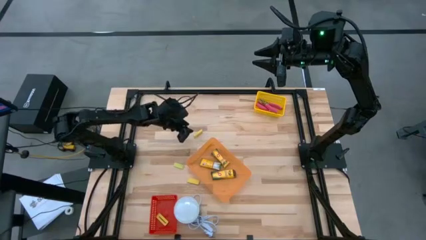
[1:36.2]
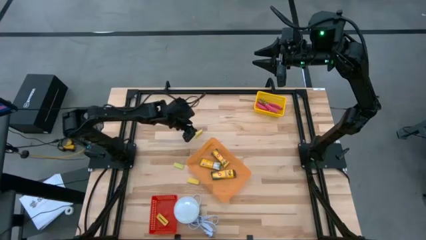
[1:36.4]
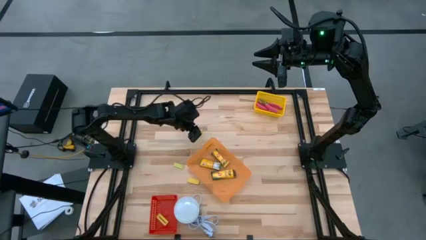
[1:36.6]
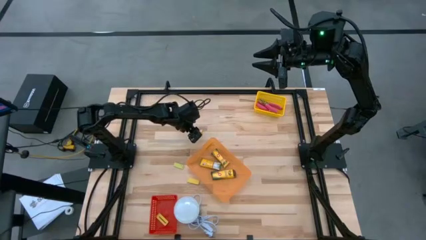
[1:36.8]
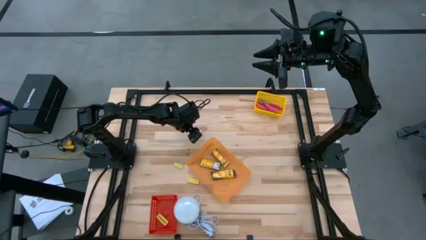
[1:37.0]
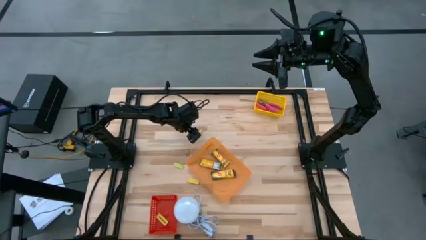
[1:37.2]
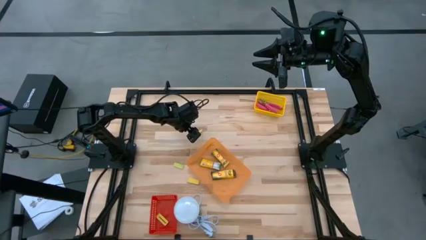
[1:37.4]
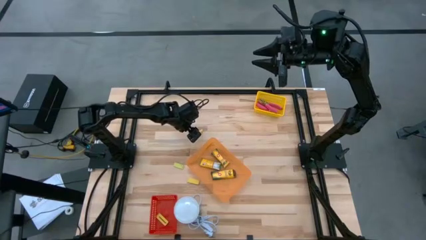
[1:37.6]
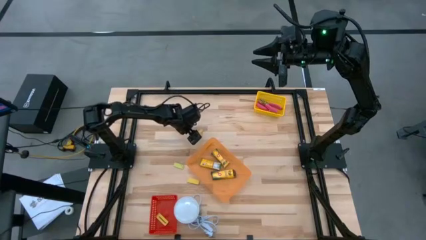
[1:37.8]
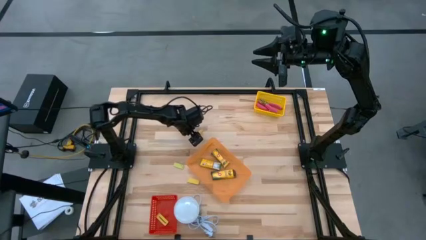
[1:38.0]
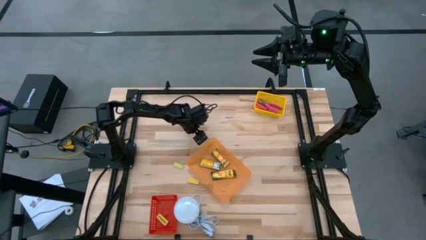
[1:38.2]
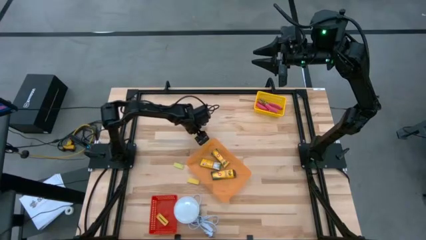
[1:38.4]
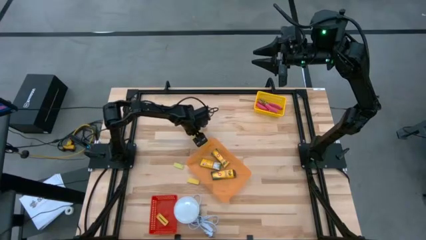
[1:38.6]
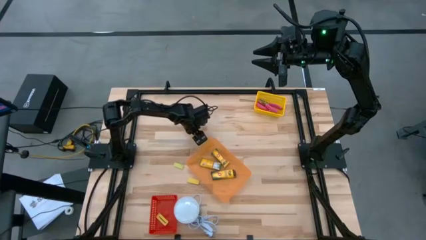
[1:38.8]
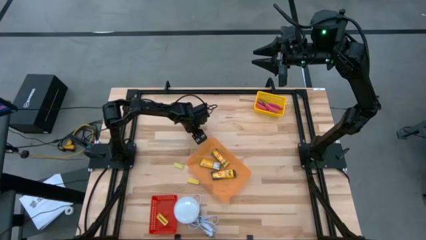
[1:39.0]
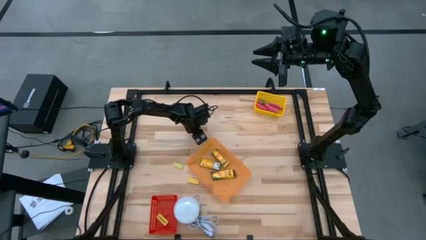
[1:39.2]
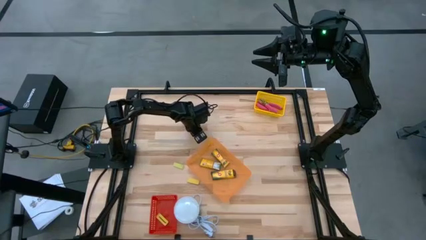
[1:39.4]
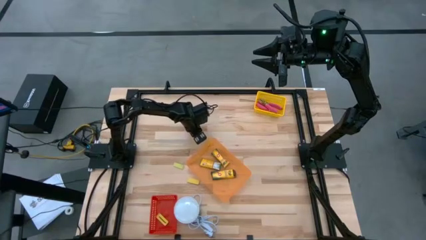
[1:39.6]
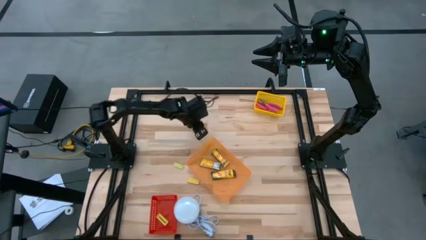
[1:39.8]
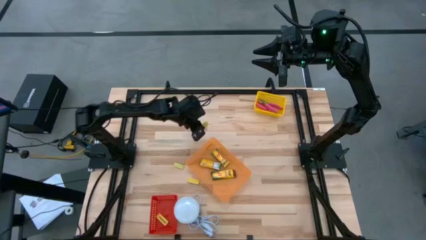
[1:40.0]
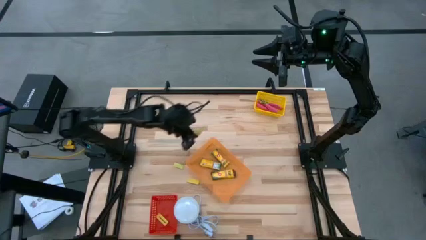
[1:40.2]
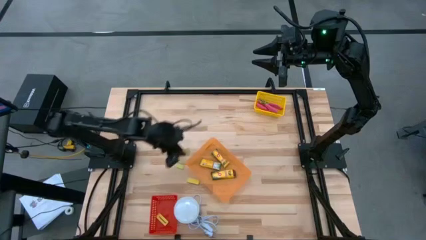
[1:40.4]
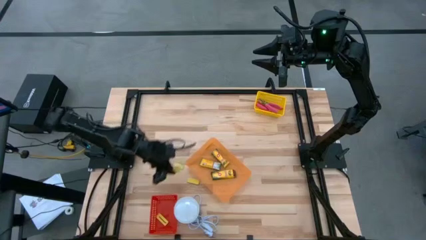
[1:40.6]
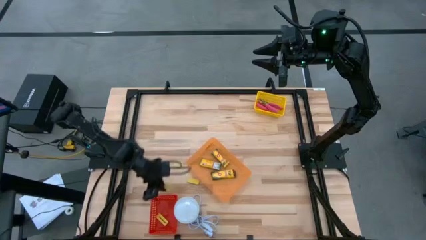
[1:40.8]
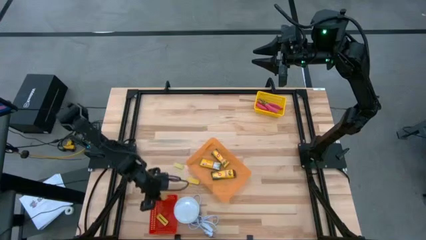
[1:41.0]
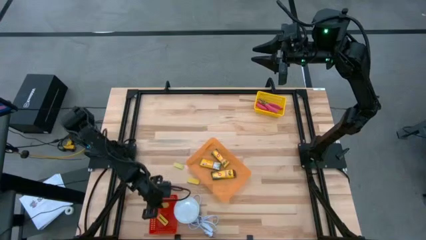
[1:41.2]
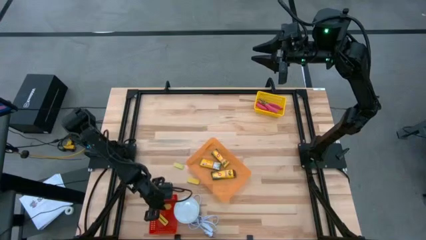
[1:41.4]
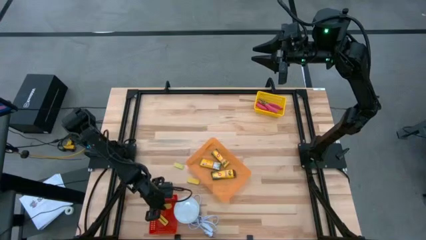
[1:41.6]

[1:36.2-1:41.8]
Task: Pick & Place School Supplies
Put the yellow eraser into the red bin

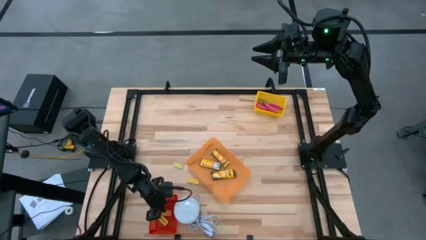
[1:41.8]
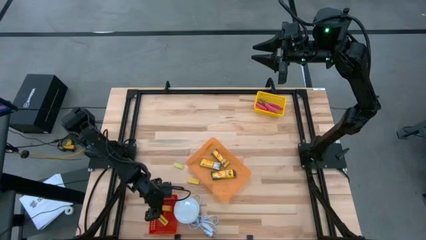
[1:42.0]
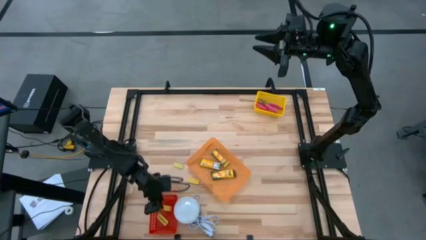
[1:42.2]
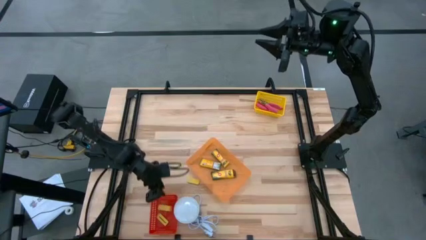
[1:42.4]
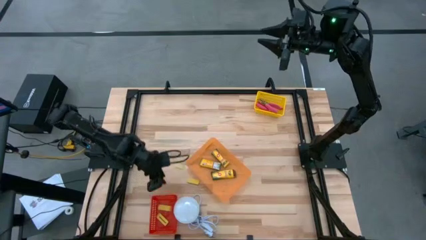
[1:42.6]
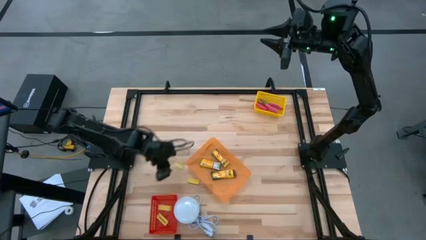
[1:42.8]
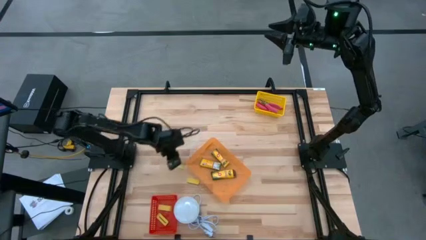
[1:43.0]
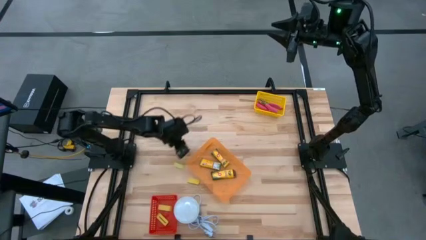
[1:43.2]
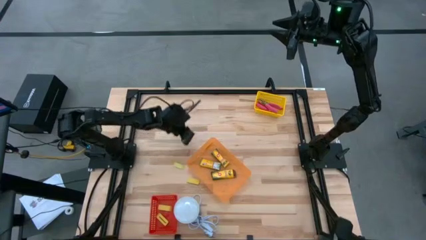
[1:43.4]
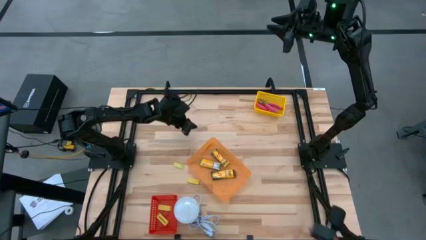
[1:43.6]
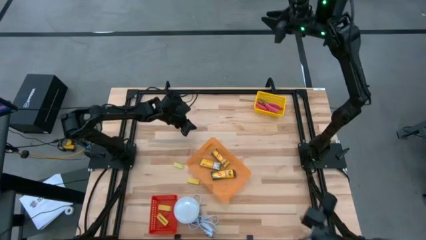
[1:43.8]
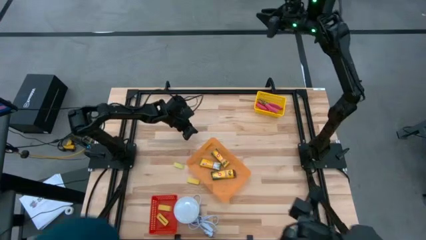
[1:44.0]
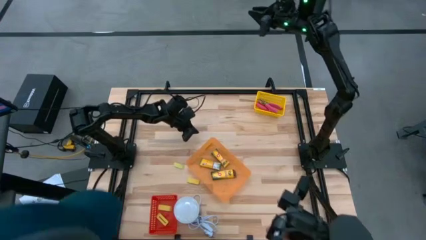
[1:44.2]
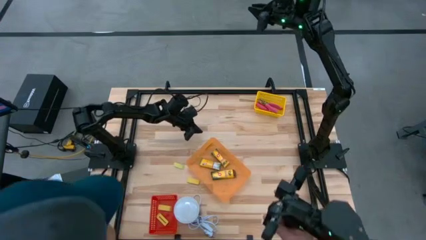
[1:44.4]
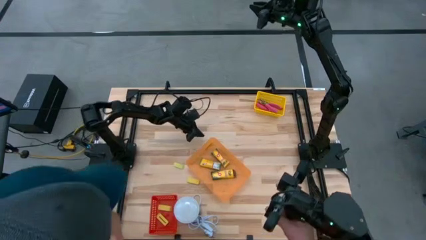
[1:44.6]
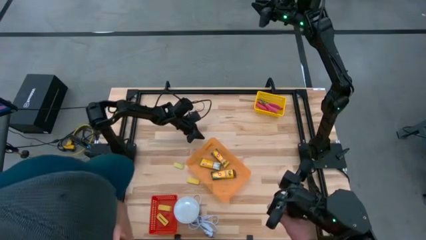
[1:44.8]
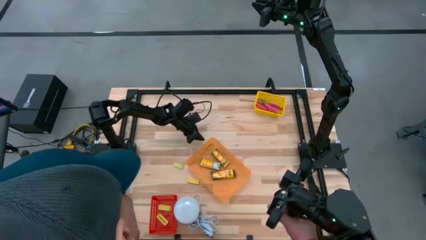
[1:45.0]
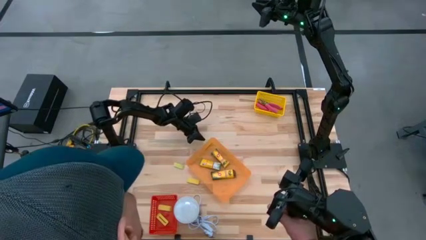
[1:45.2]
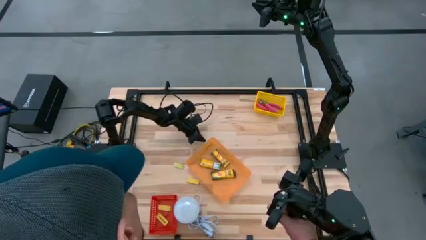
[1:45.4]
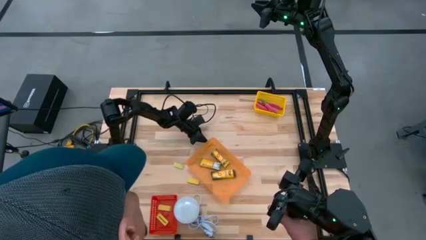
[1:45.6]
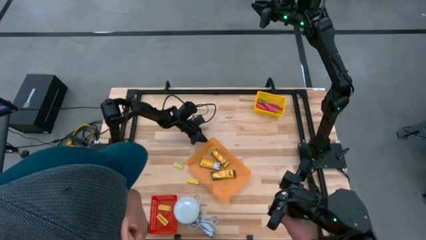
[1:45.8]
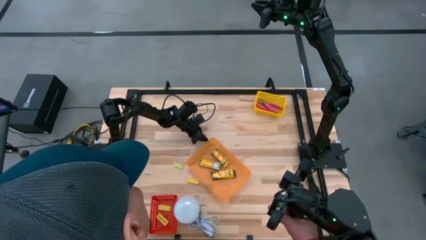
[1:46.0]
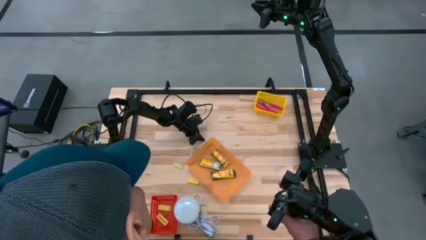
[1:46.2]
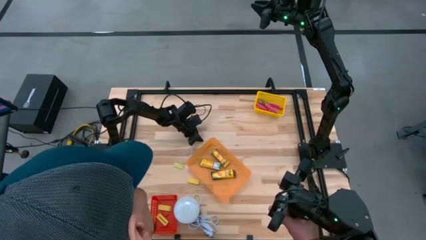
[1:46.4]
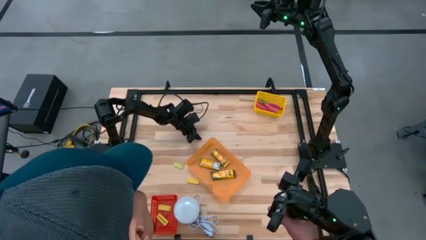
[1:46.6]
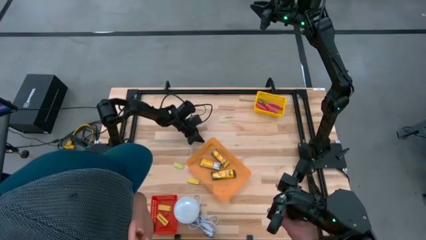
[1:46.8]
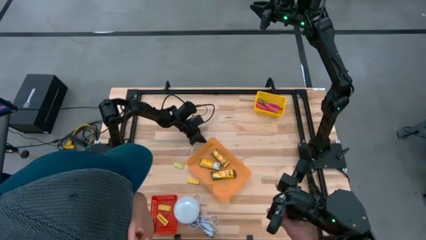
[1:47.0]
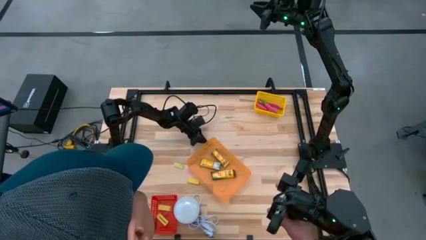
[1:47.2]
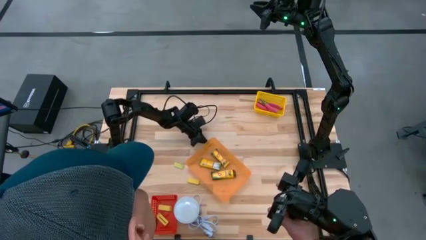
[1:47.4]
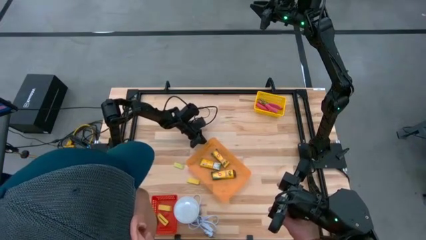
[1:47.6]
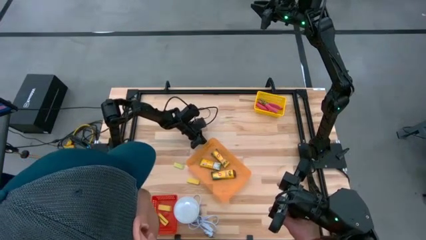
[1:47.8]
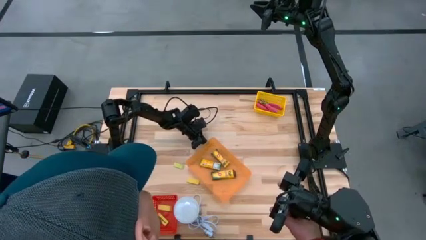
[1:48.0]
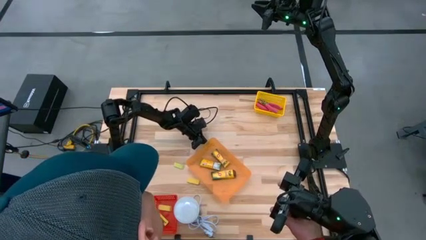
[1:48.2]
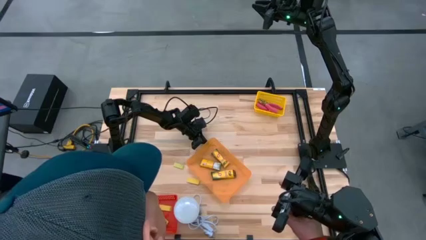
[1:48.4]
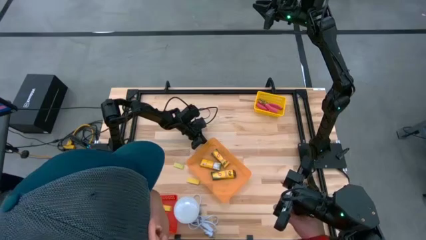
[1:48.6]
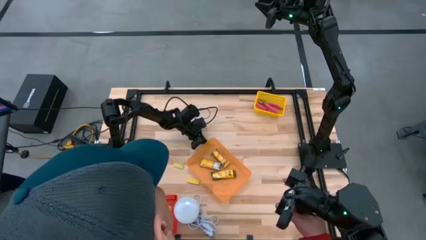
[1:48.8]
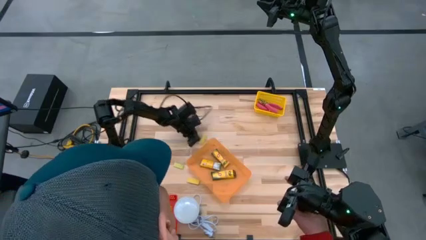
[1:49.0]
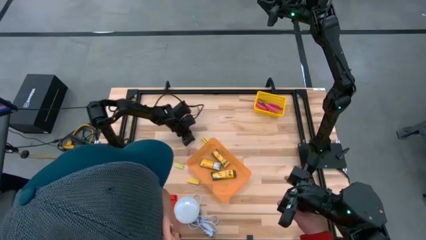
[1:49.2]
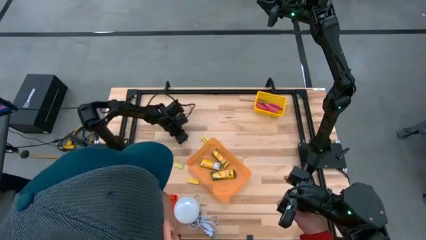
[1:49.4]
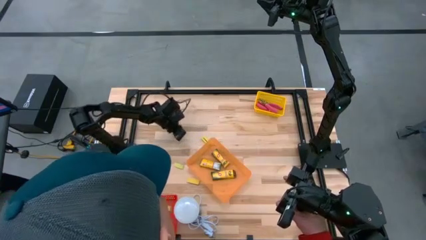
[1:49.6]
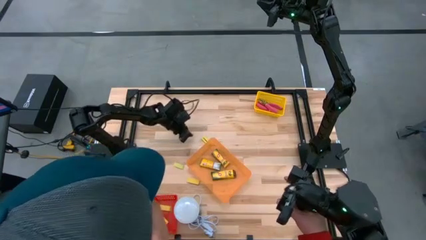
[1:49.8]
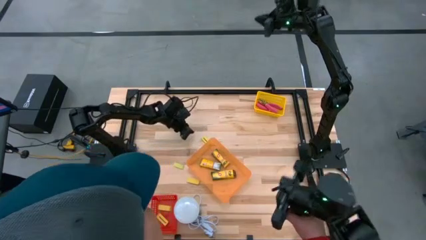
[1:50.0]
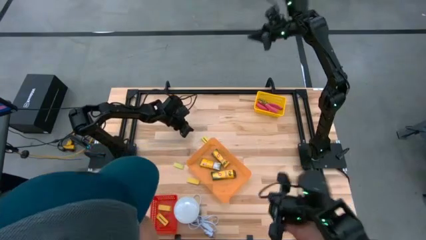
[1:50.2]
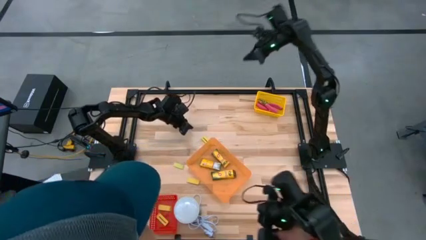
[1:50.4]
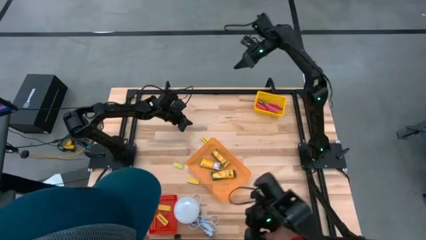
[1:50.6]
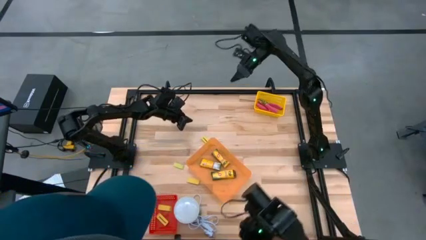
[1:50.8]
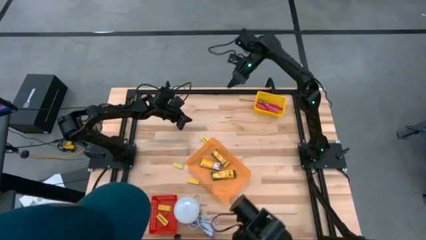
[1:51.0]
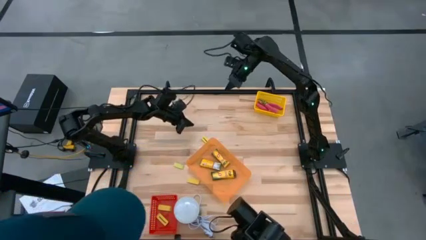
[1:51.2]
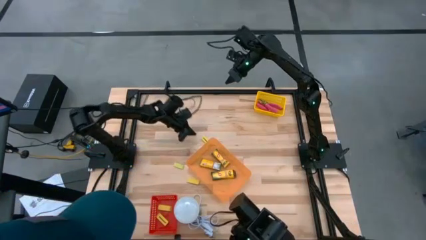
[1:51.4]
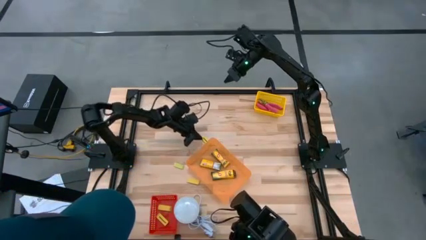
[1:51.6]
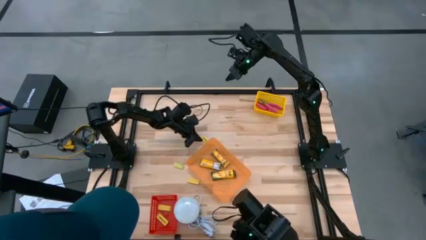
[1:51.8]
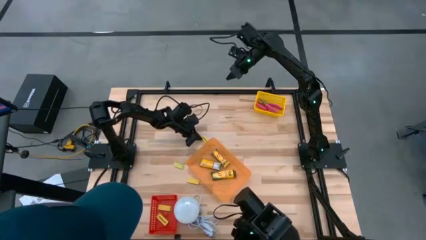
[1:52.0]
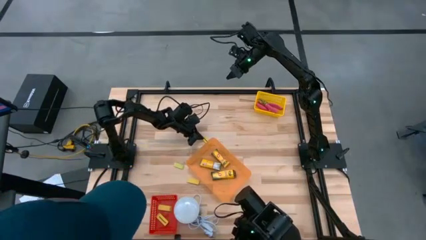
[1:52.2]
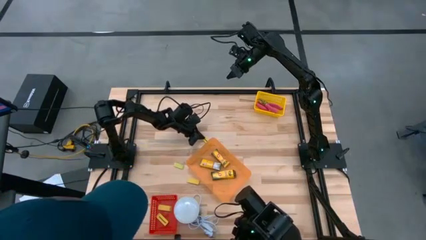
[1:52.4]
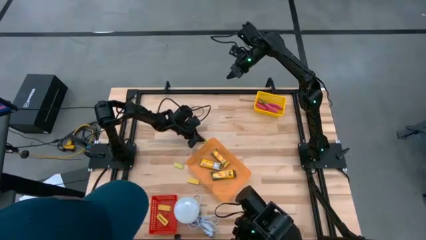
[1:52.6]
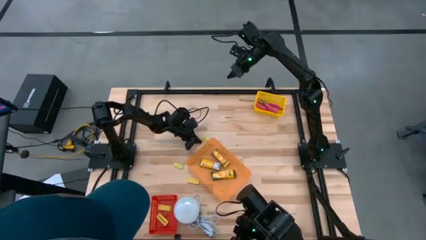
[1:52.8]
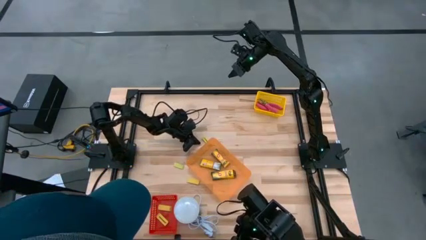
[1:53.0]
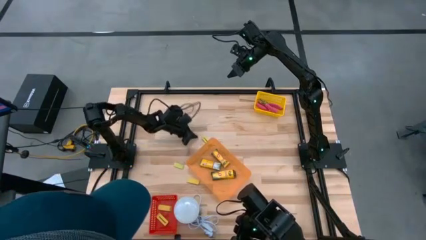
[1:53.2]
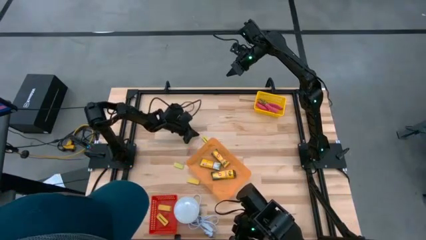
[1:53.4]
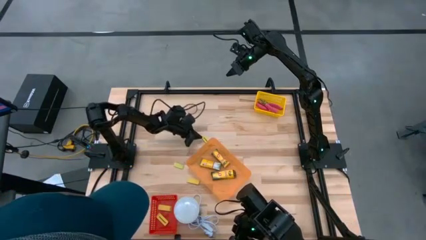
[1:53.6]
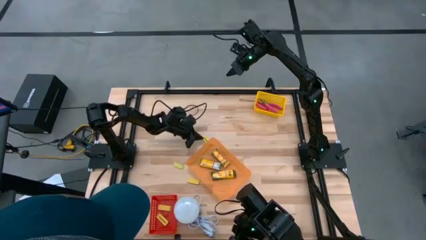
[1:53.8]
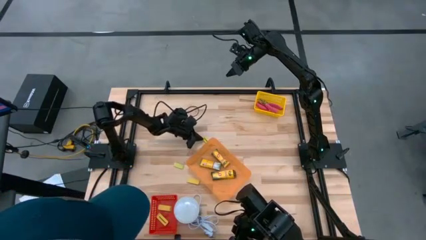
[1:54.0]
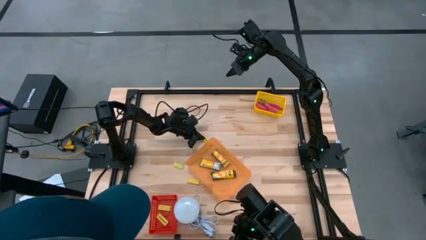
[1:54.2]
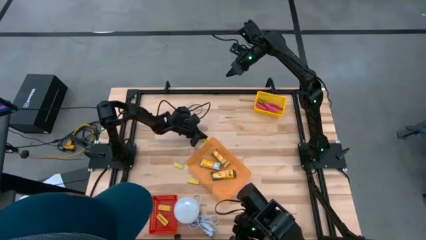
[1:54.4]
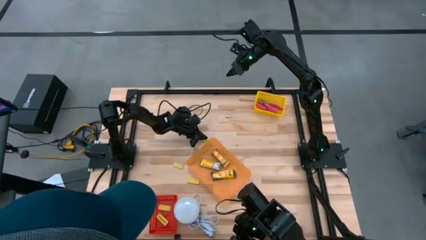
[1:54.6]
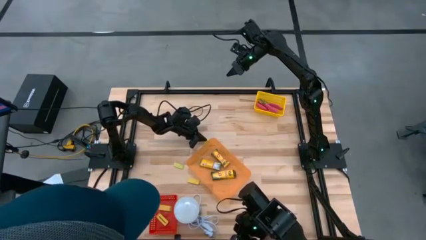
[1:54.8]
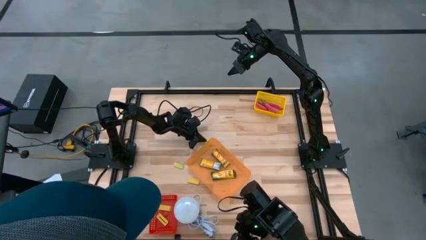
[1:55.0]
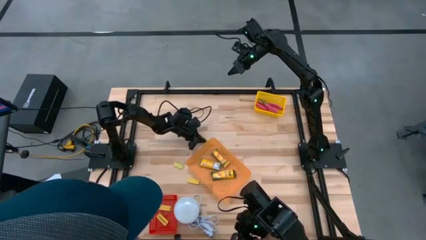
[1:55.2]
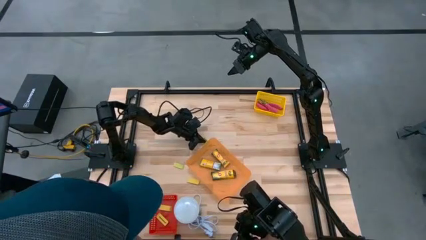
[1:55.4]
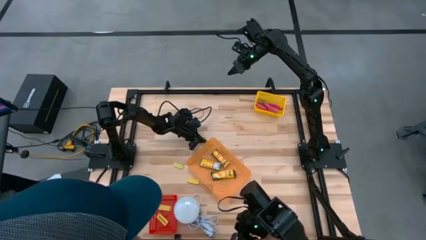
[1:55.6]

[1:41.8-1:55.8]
Put the yellow eraser into the red bin
